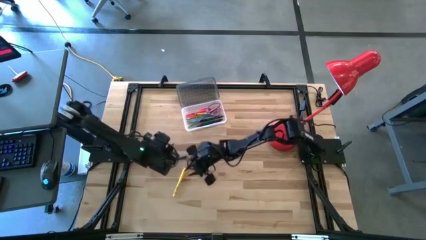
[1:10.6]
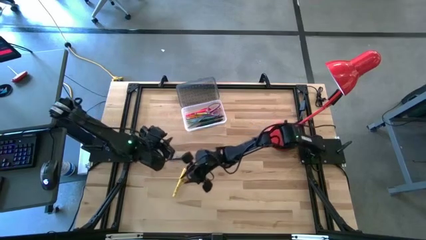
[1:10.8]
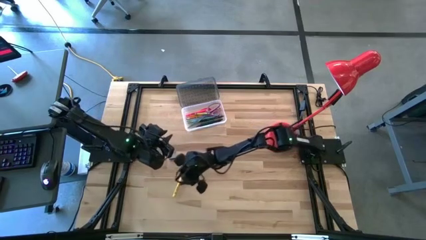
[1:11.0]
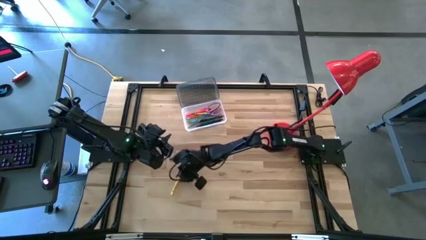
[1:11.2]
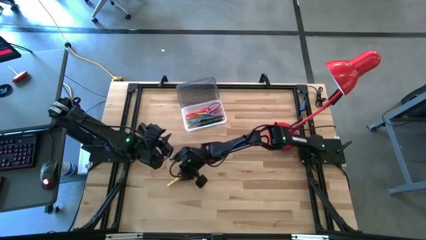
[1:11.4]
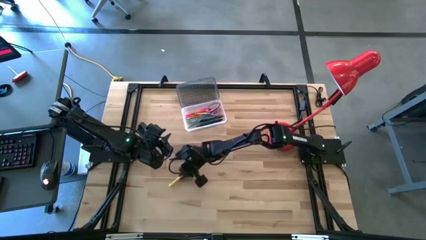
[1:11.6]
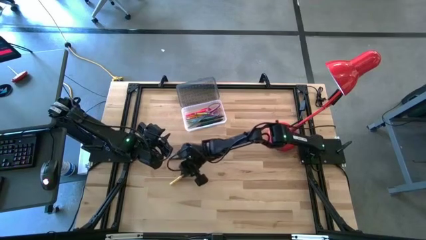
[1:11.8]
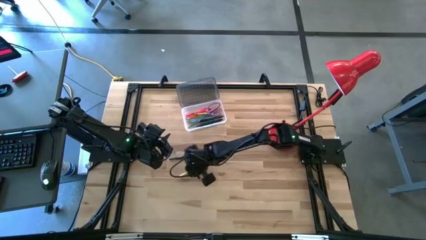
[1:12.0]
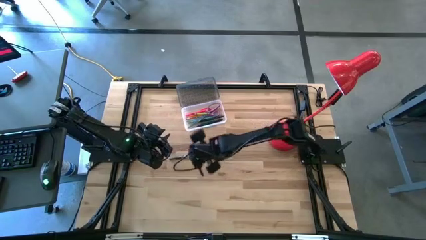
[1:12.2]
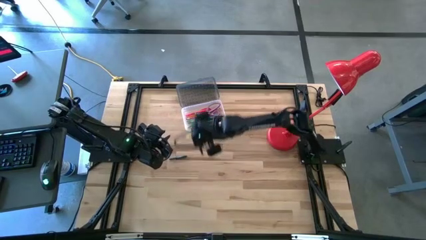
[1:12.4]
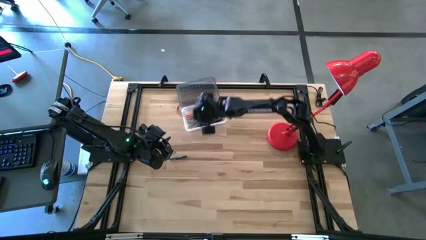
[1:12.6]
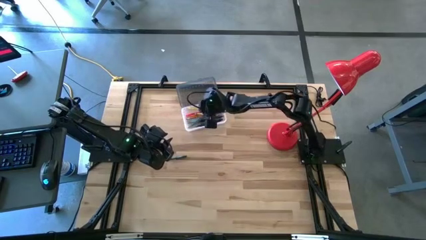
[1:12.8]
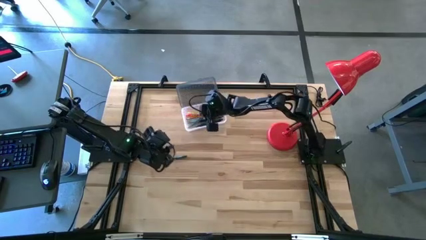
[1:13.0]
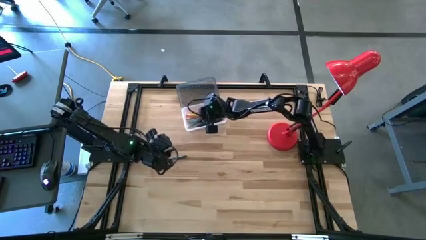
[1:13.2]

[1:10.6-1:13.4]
Task: Pick & place school supplies into a supply box
Put the yellow pen into the supplies box

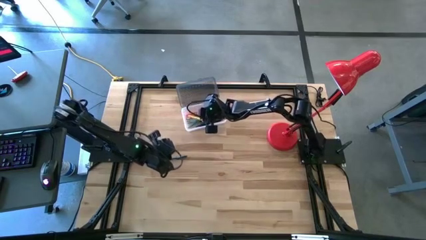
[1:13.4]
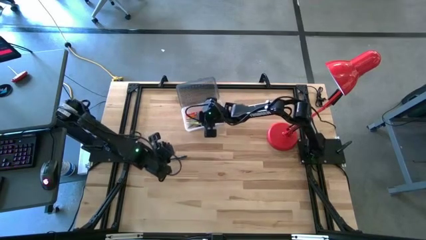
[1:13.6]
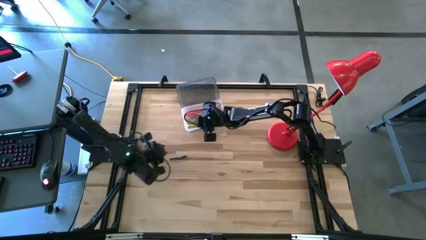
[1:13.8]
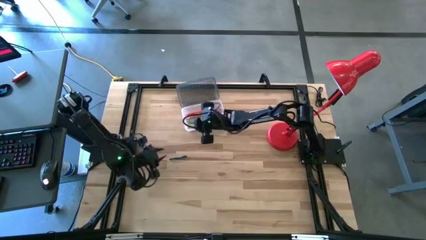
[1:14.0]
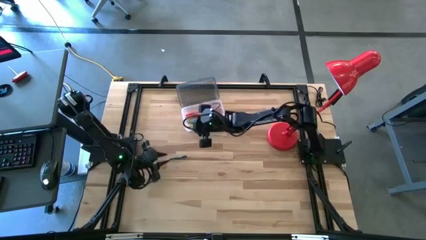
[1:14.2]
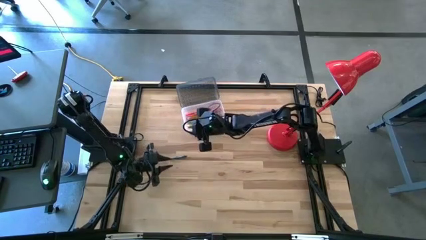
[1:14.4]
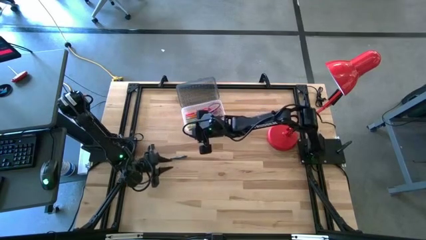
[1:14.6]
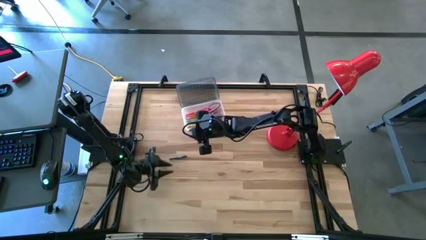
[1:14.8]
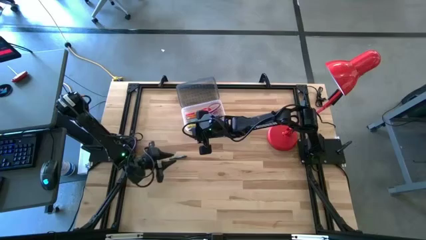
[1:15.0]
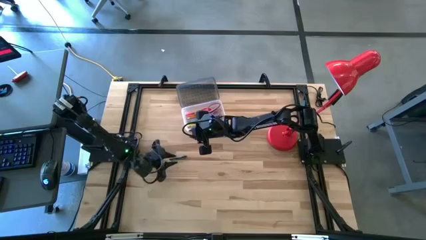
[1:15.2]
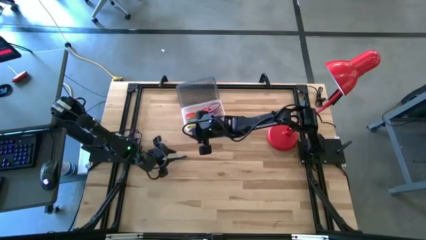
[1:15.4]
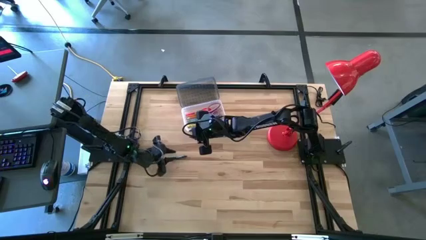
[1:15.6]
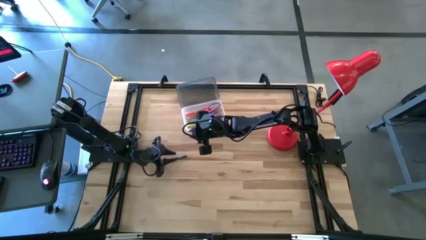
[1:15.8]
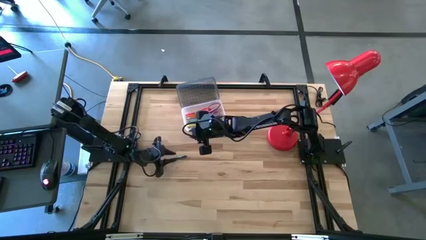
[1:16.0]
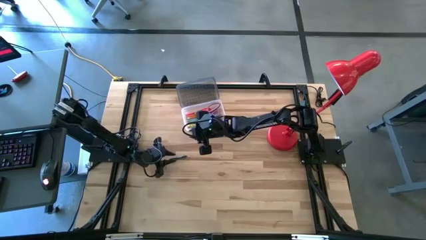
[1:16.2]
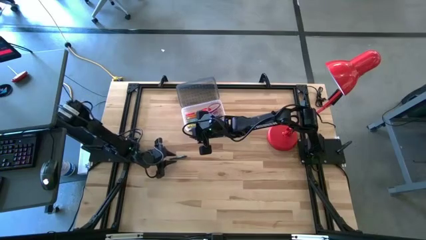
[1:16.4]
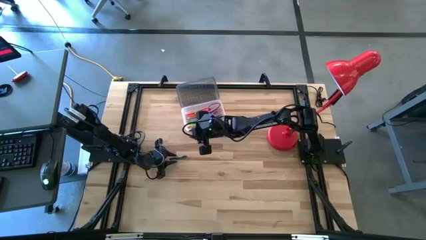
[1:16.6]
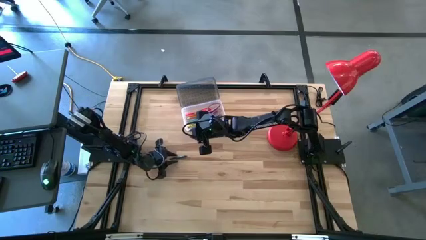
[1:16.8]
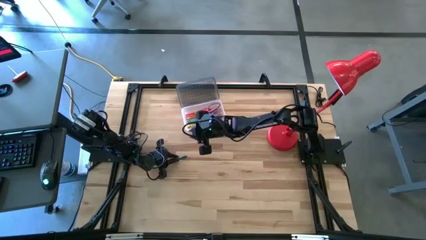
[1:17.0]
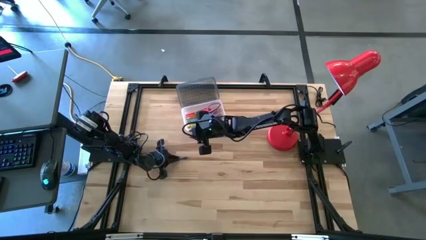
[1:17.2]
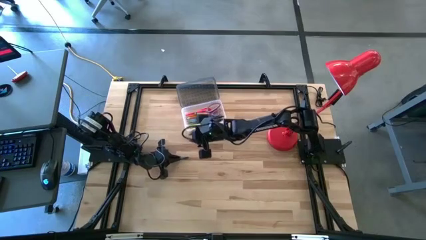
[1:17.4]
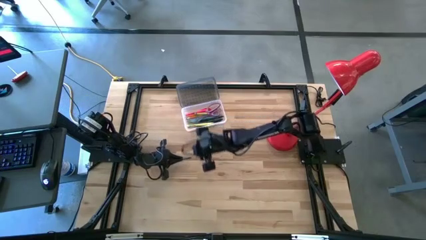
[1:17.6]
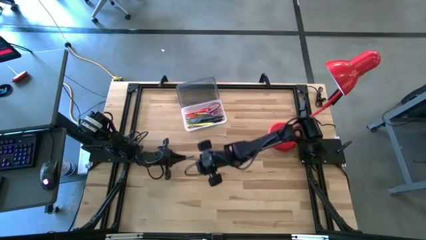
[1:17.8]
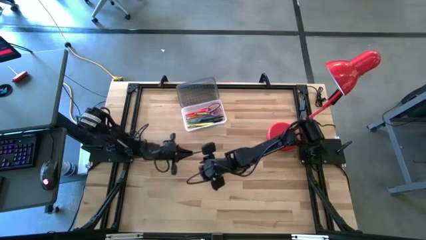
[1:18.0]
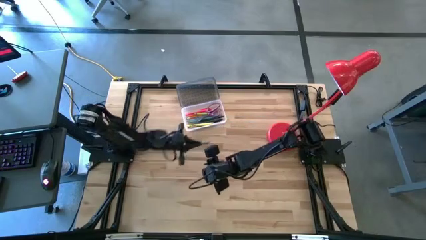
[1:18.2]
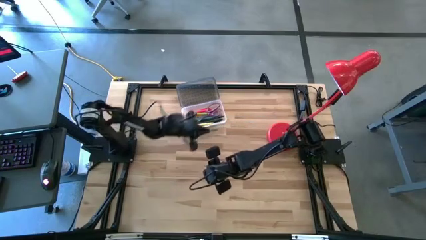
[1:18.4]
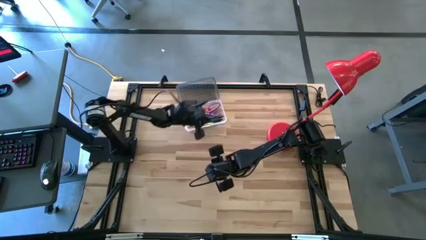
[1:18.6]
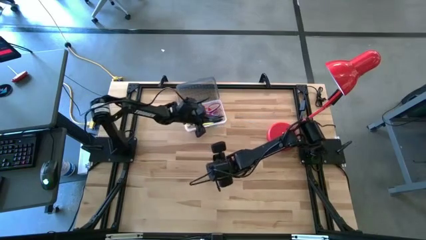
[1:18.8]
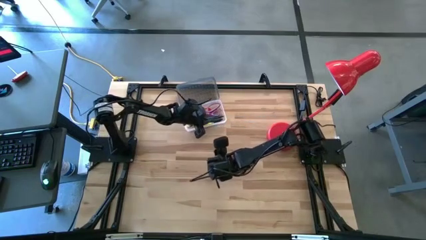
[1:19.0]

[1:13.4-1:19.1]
Put the green crayon into the supplies box

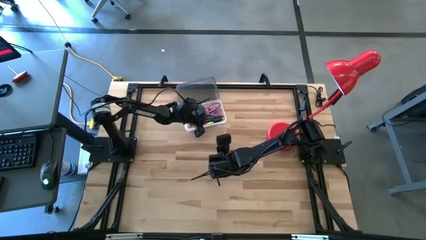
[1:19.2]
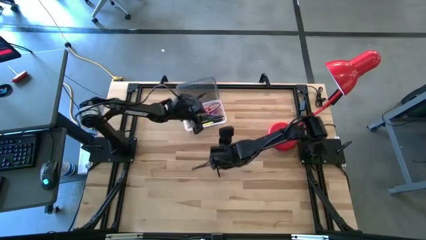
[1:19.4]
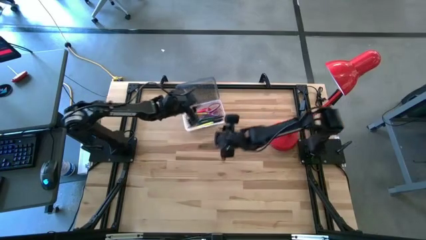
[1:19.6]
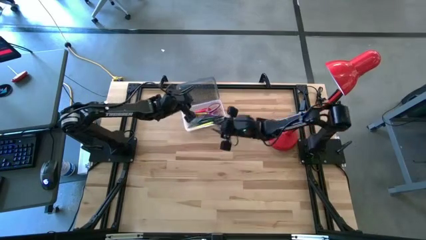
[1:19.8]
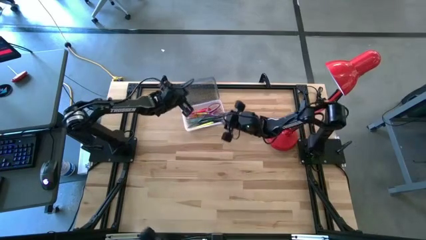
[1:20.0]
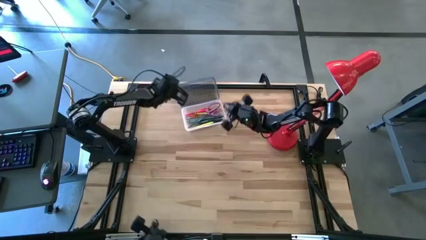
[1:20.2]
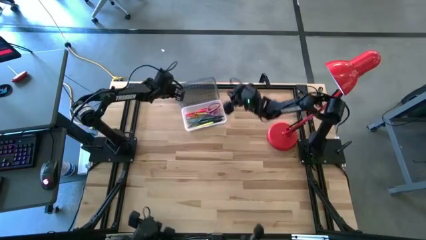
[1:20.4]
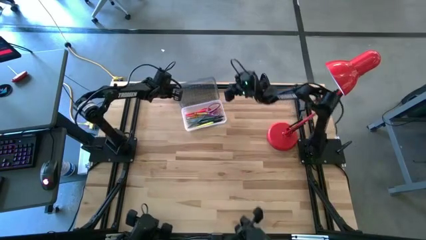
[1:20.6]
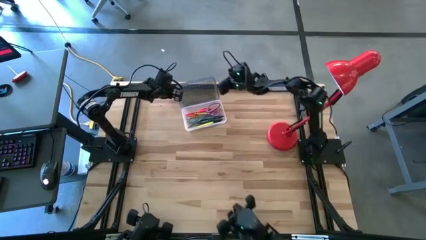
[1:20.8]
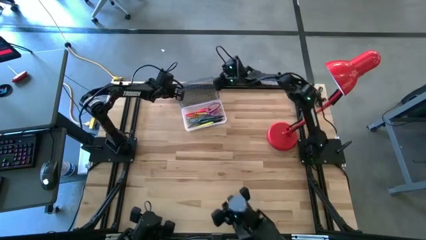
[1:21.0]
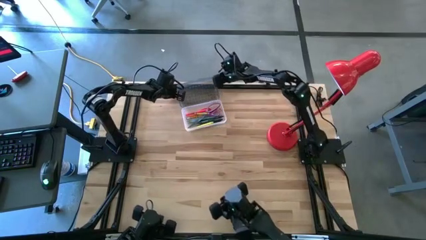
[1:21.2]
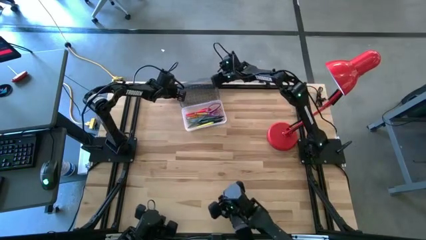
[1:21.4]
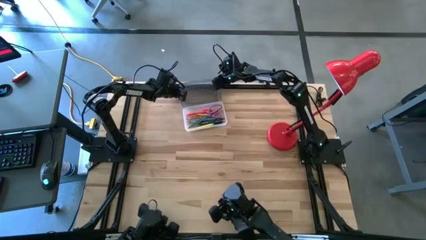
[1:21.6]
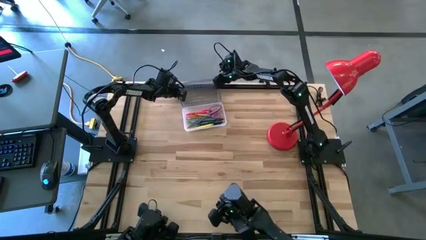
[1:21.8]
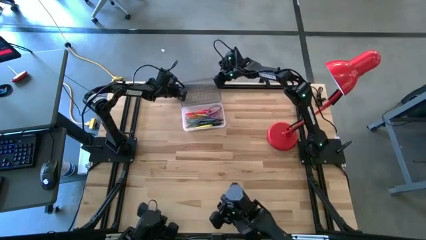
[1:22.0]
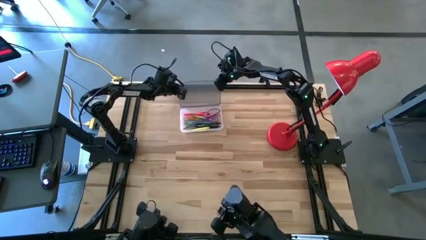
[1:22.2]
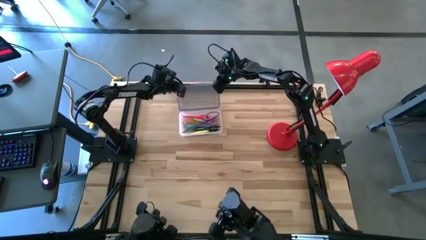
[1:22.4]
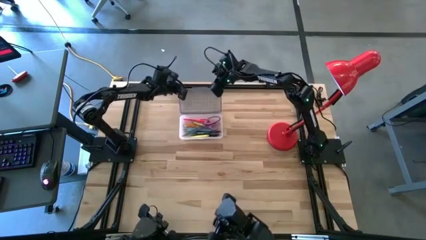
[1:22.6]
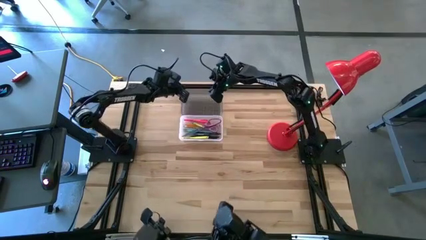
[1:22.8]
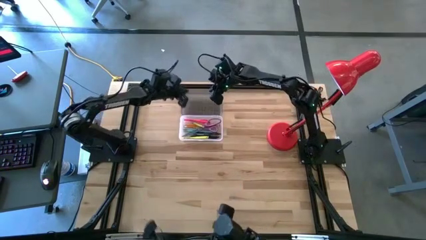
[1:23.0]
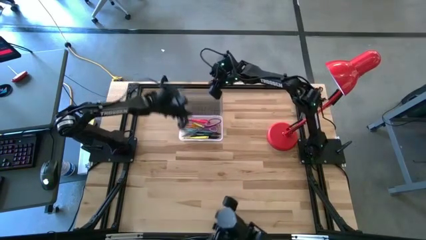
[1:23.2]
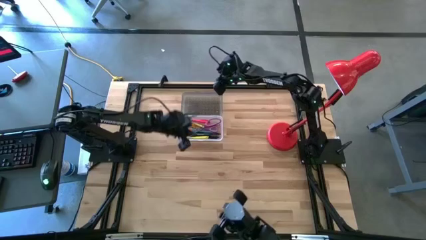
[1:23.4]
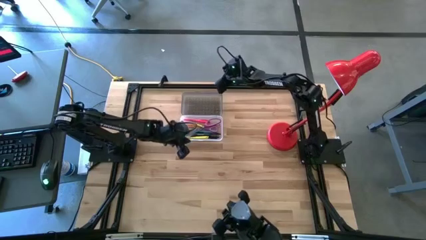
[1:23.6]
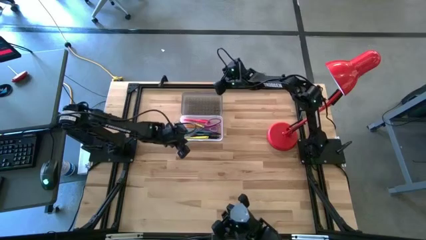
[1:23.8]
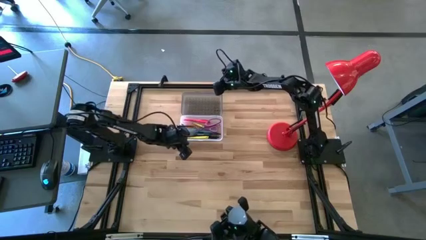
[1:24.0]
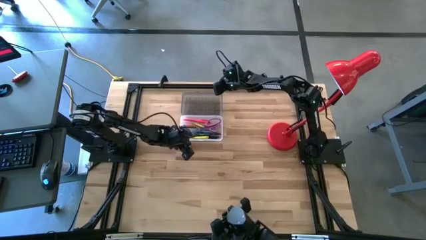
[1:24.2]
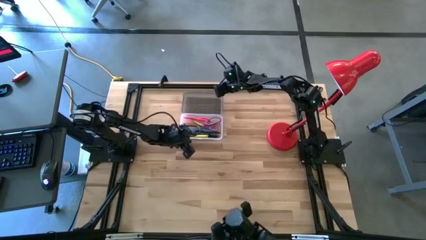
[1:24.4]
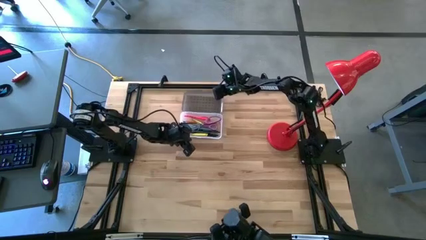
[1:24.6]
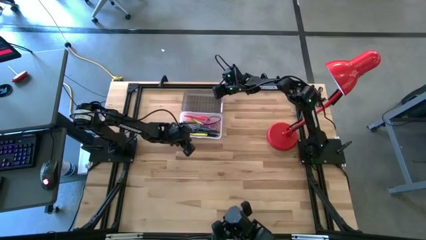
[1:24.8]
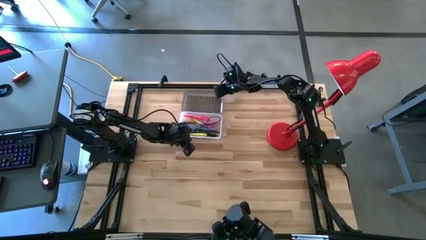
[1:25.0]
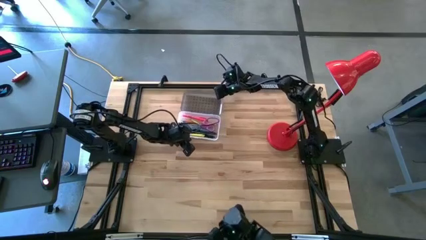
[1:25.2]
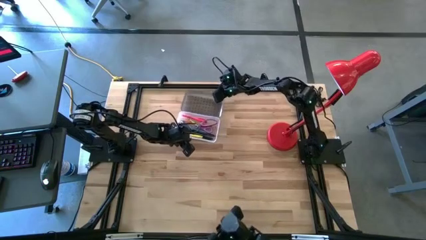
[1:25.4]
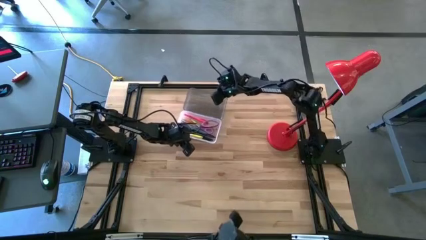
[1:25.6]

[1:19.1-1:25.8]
Close the pencil box

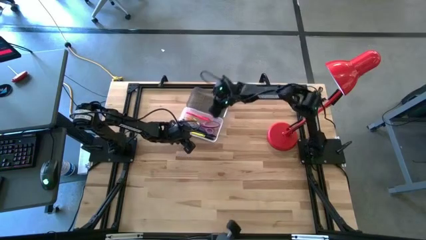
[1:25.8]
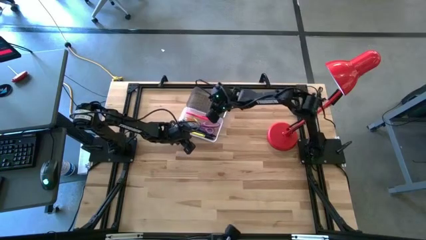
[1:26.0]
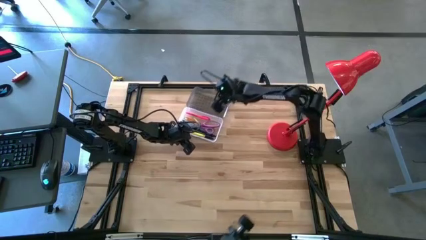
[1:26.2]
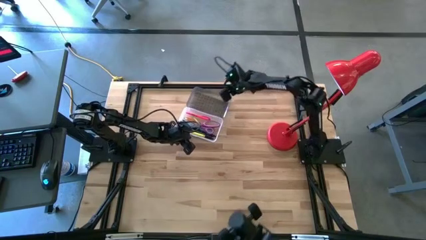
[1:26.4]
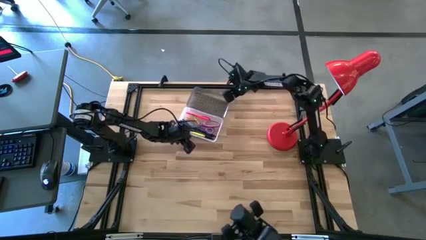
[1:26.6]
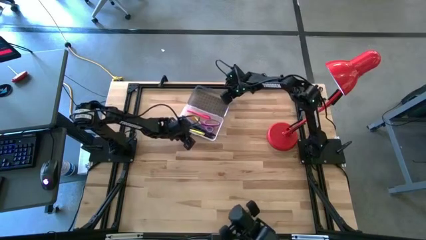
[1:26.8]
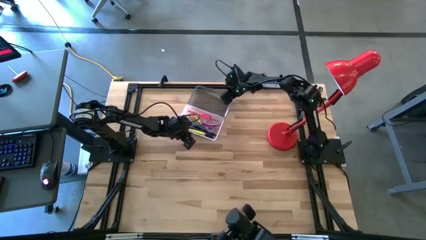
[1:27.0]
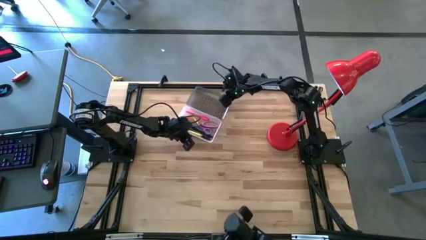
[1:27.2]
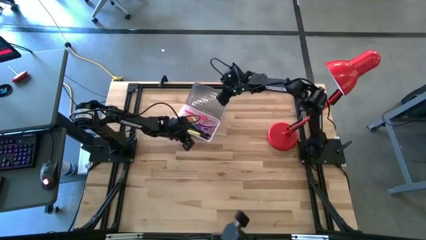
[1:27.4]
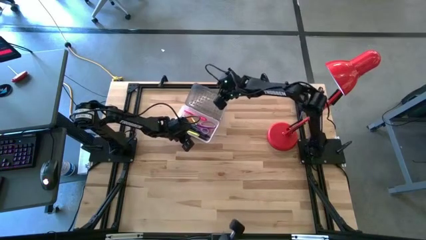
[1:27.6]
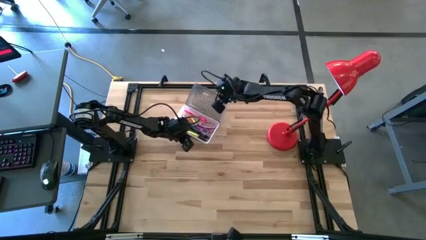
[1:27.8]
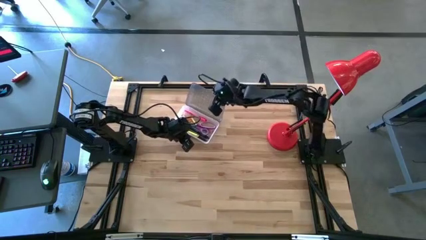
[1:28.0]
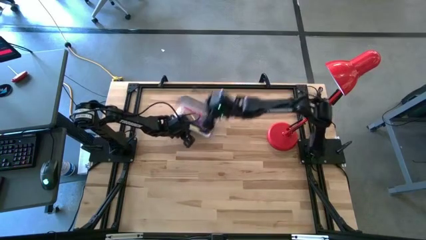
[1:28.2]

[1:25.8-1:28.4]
Close the pencil box
